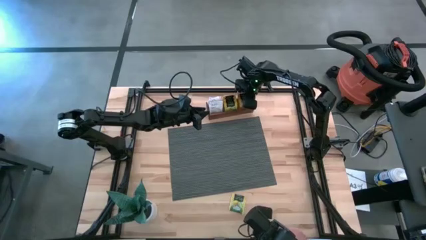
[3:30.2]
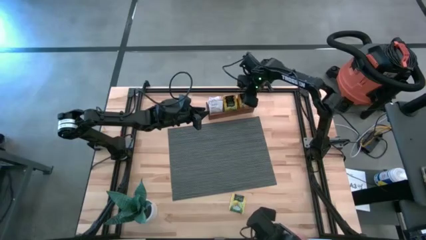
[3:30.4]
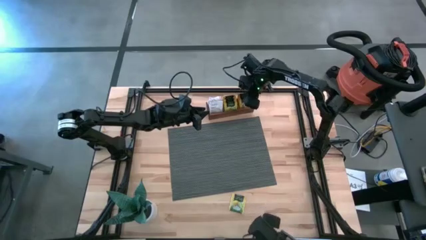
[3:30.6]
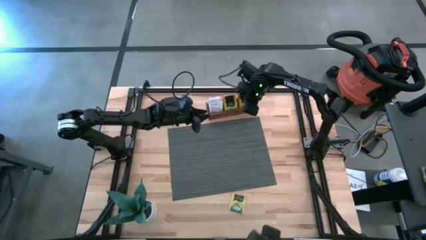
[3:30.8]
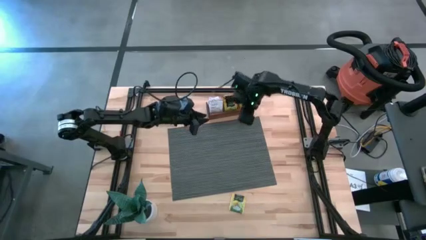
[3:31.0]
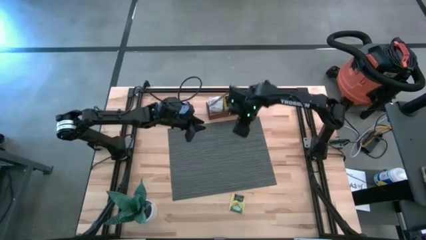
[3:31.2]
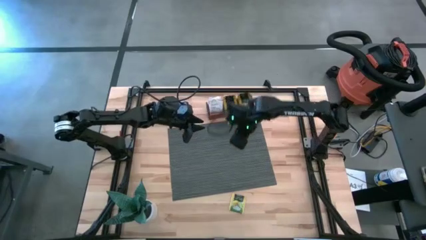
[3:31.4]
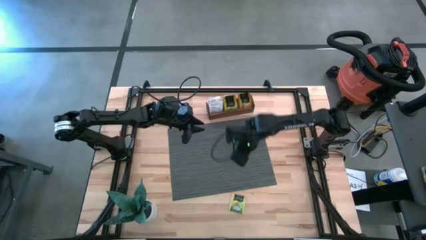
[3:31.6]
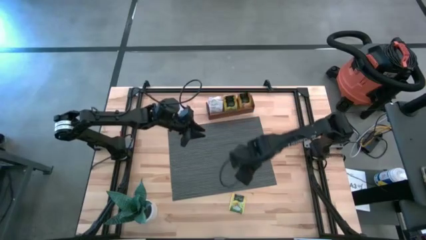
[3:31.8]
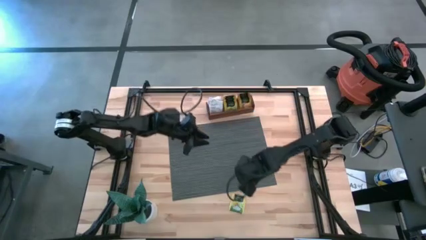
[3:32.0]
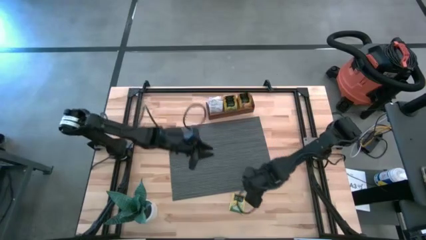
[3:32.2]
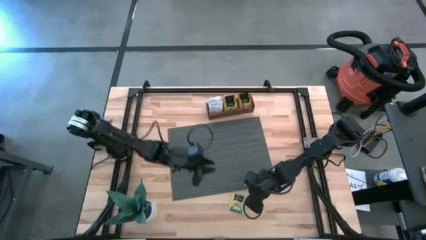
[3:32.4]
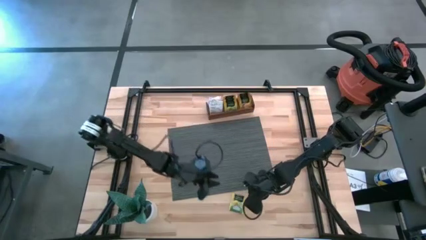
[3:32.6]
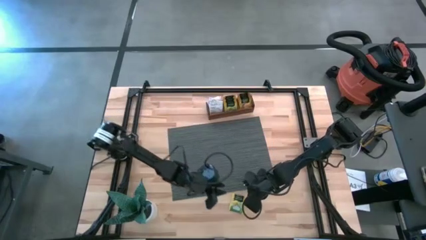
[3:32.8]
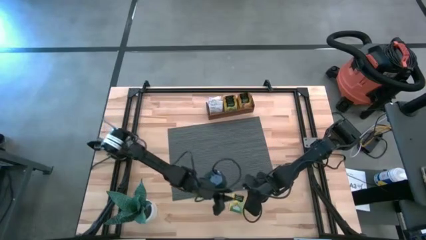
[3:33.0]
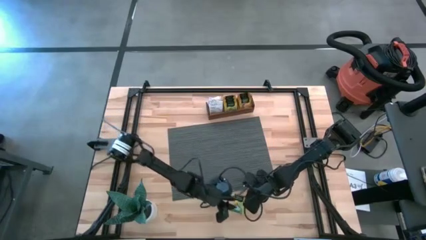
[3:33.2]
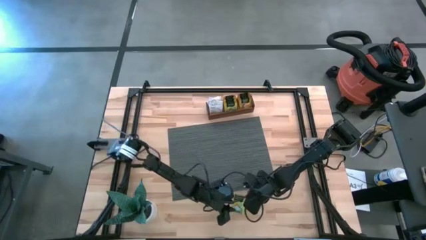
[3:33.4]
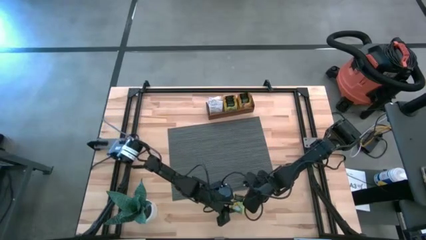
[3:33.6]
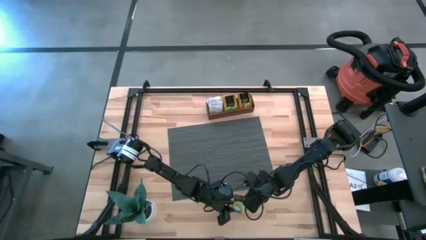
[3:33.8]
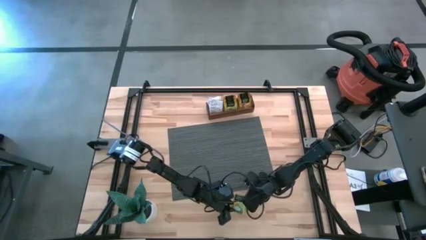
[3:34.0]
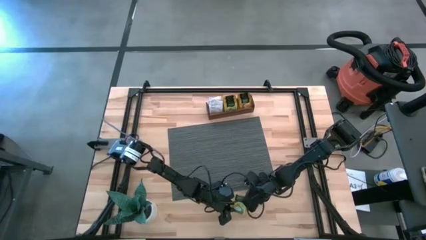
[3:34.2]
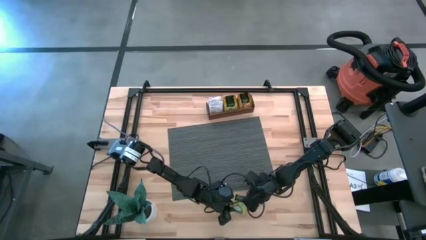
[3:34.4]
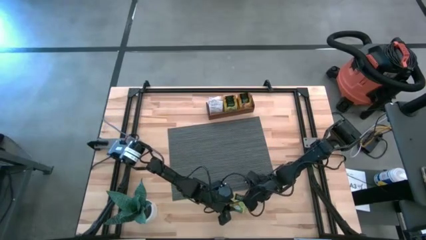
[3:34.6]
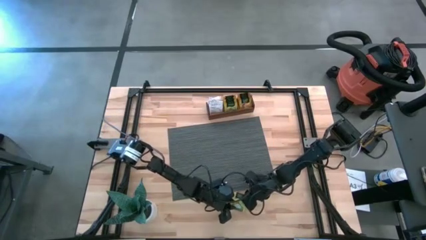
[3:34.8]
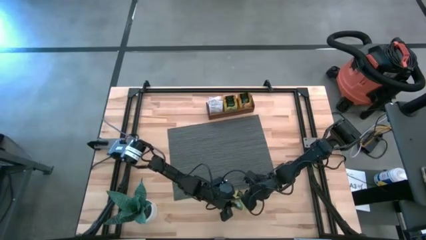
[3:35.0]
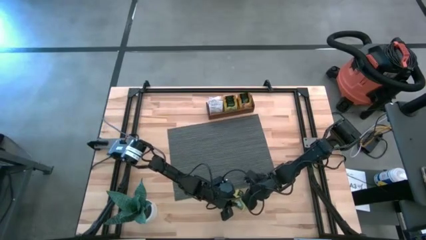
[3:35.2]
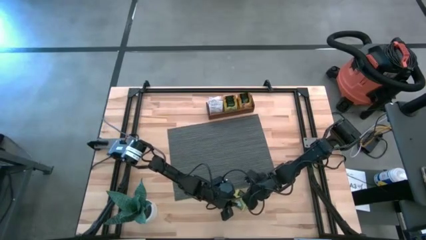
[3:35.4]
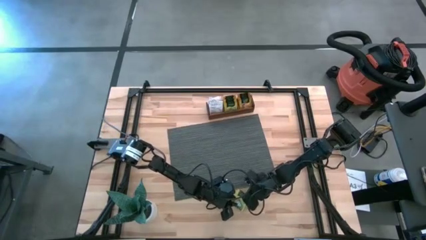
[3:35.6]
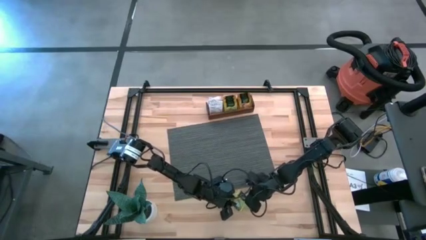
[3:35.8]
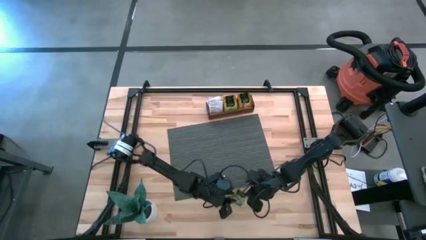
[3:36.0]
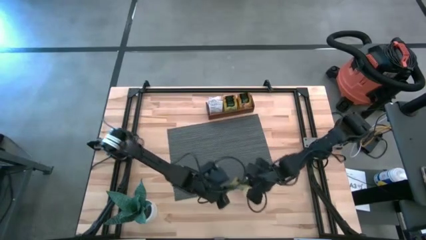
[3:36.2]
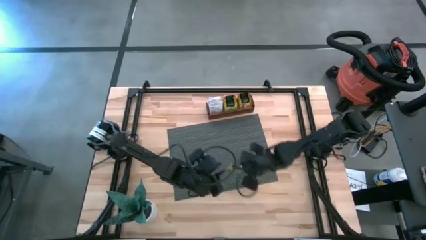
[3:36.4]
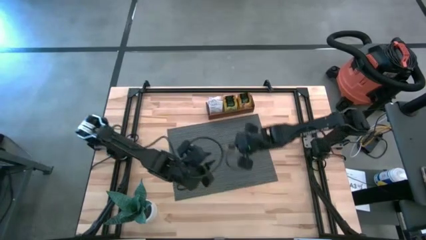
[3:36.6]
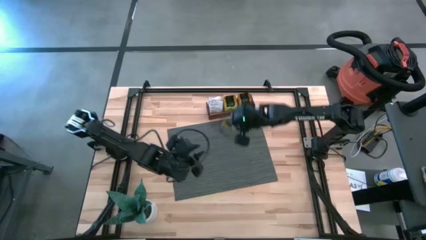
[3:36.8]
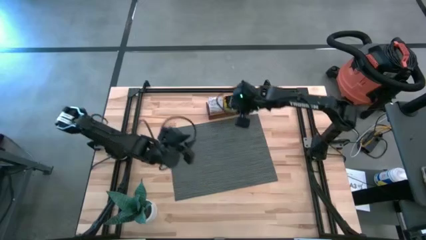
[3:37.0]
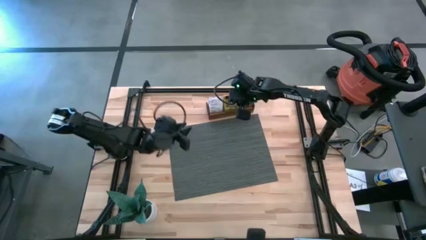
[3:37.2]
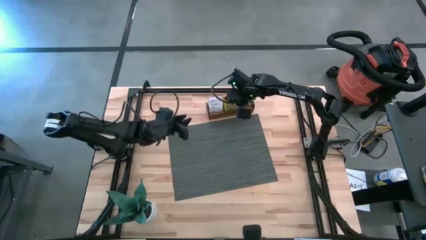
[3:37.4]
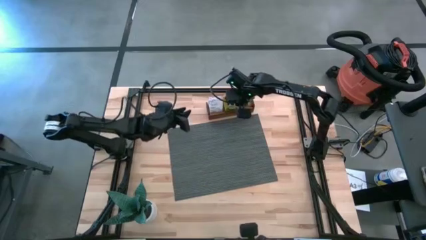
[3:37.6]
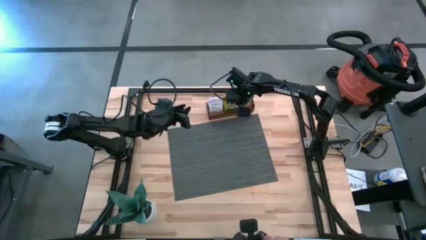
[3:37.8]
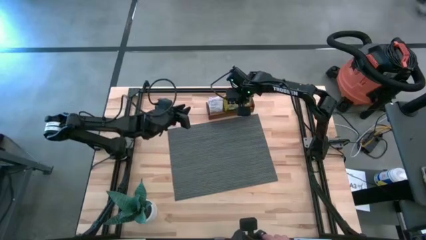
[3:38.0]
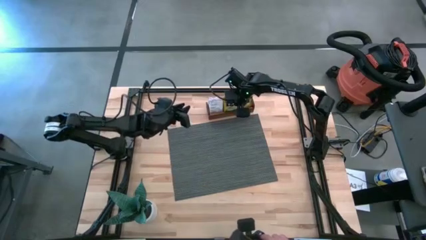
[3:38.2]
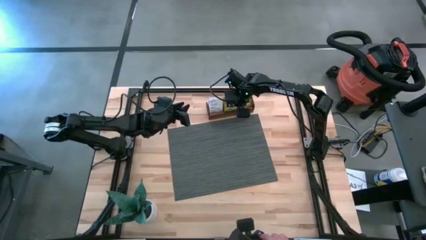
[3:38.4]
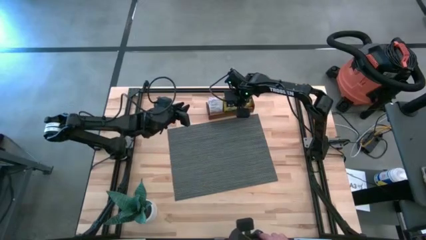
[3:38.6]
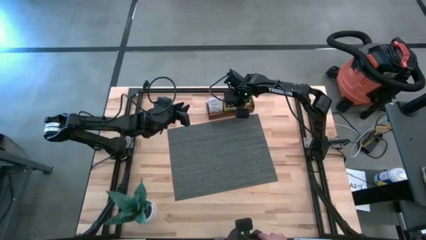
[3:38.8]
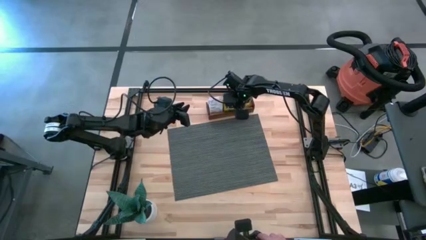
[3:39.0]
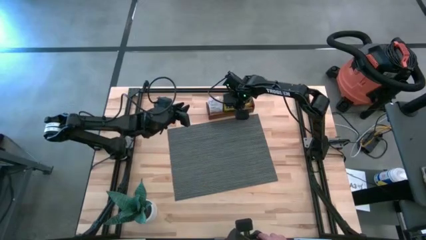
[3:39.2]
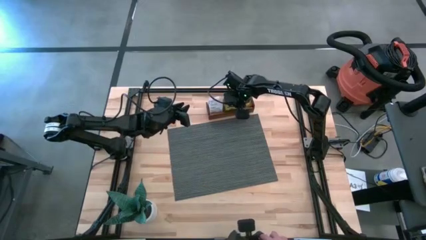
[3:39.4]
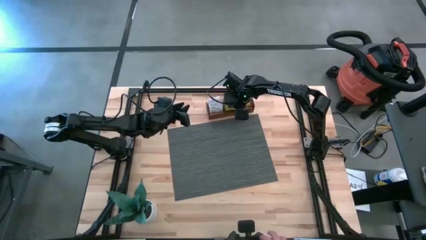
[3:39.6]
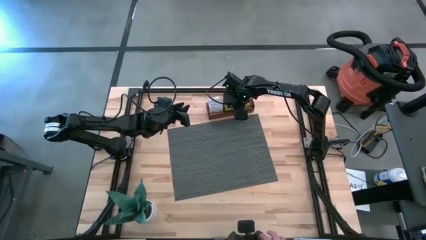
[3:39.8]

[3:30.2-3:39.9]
Task: Pick & Place Tea
Put the yellow tea bag into the middle section of the wooden organizer

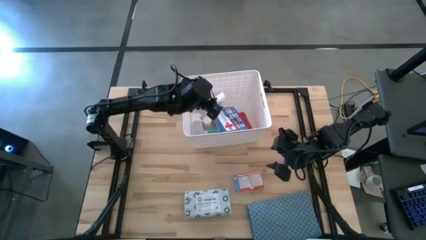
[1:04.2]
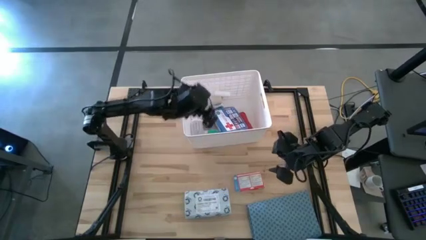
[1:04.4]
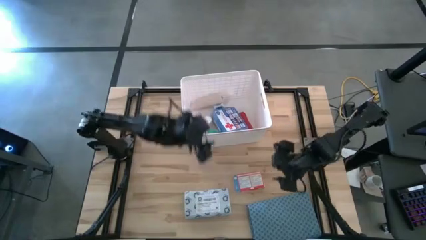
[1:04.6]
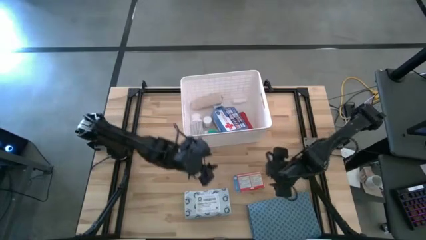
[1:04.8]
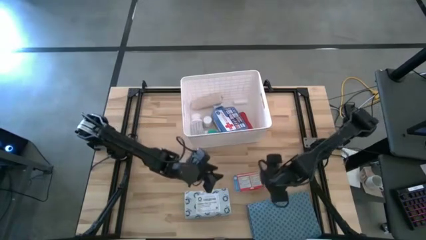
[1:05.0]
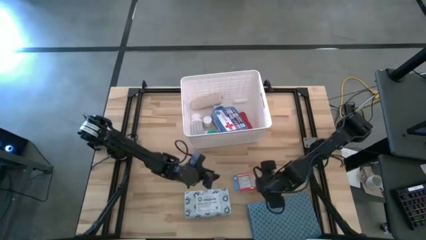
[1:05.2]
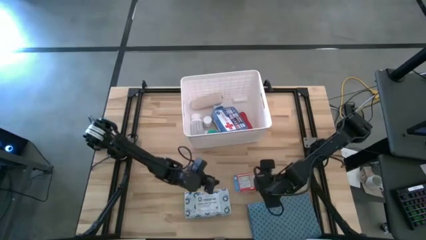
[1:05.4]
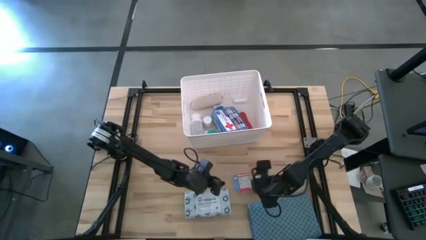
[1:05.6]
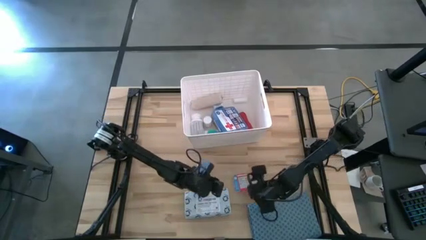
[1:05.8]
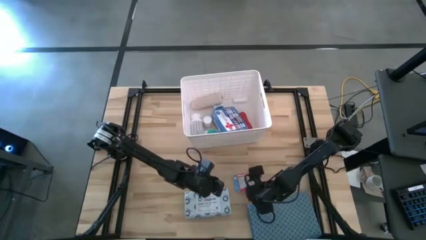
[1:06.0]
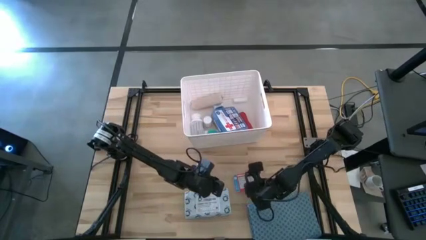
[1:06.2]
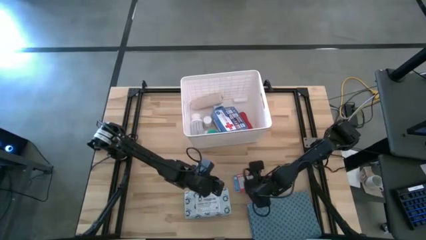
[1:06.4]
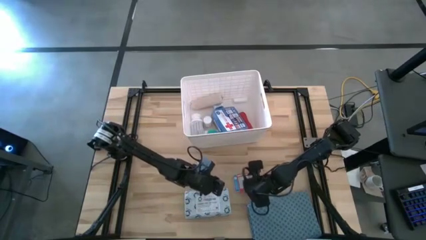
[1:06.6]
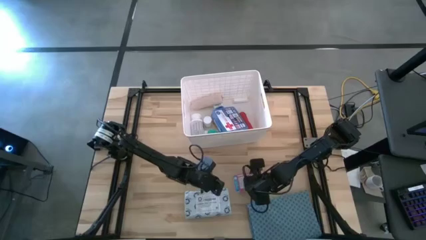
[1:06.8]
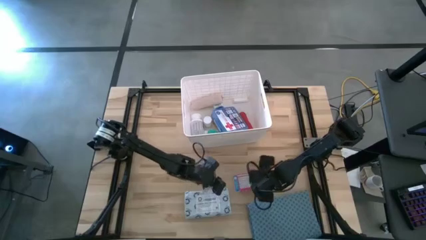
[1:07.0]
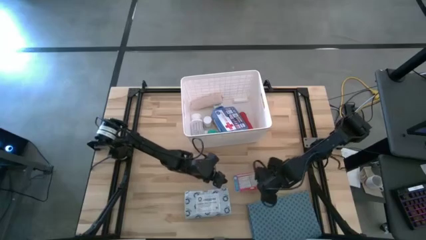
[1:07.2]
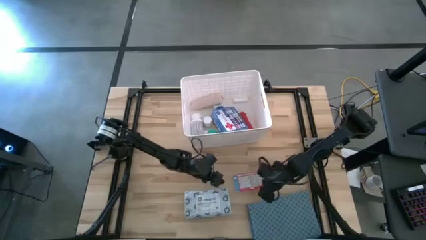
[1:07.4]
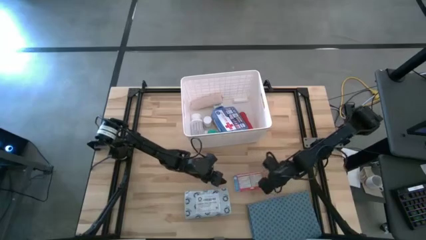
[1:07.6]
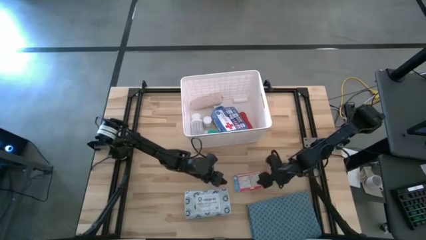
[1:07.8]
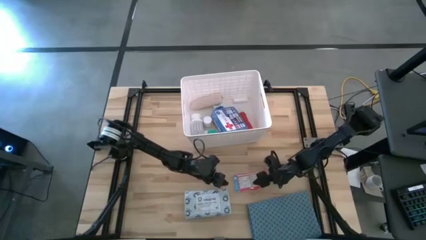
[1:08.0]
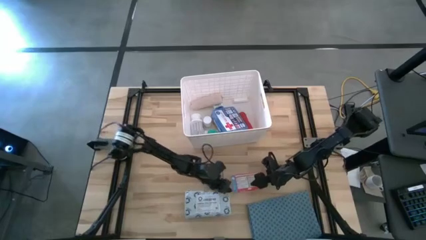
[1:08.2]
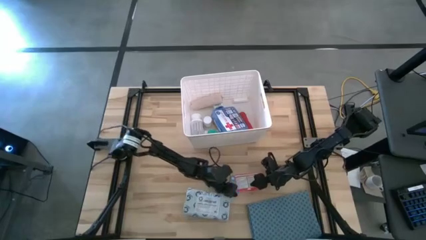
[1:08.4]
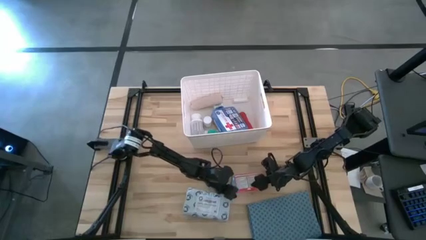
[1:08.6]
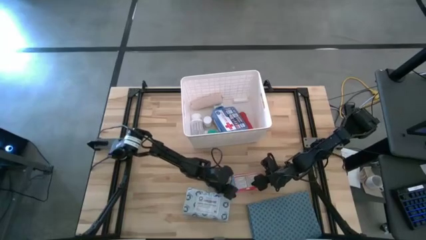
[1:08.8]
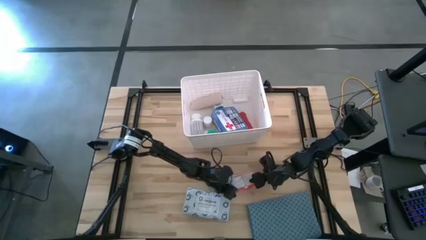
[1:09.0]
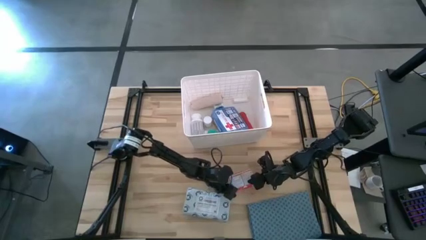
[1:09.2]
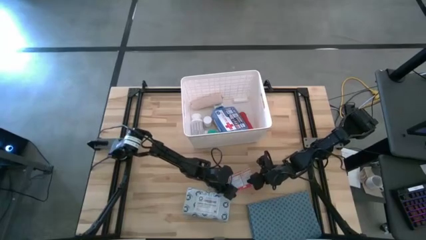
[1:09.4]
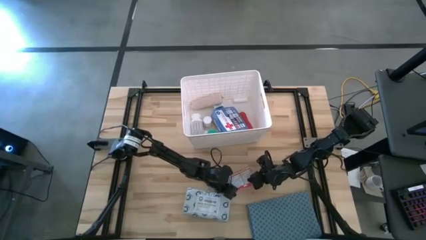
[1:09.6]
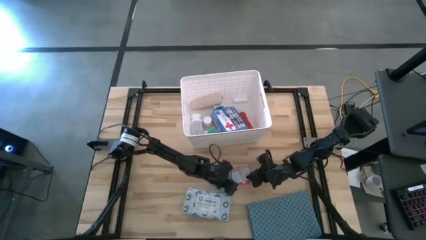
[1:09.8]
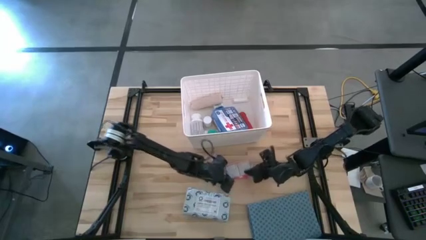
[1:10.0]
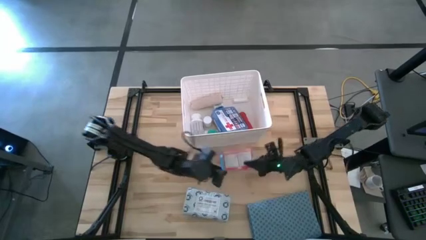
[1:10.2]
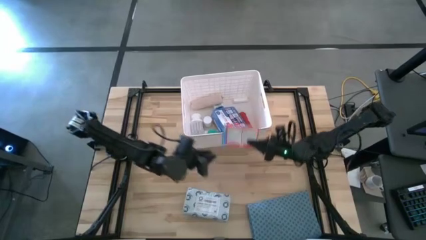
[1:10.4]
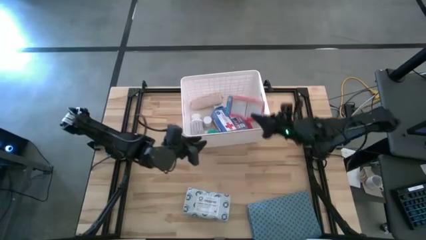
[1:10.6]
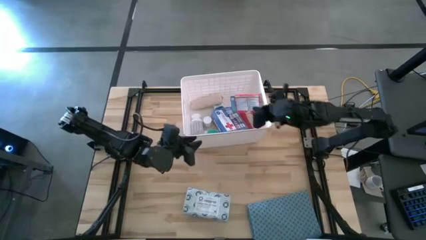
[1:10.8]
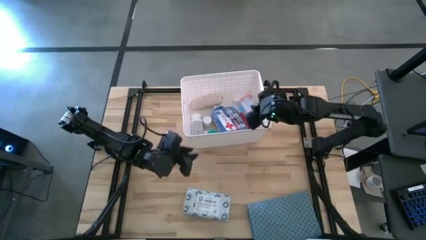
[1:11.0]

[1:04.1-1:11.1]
Task: Pick & place medical supplies in basket/bin
Put the red medicine pack into the white bin
